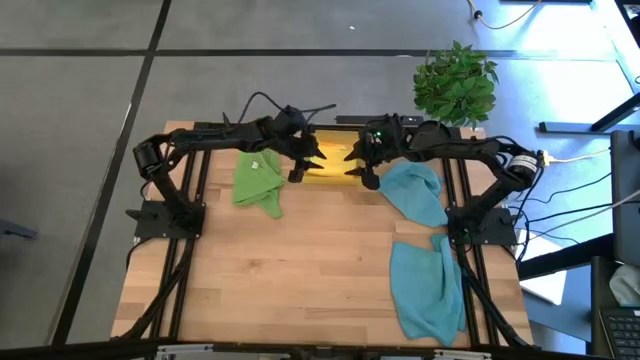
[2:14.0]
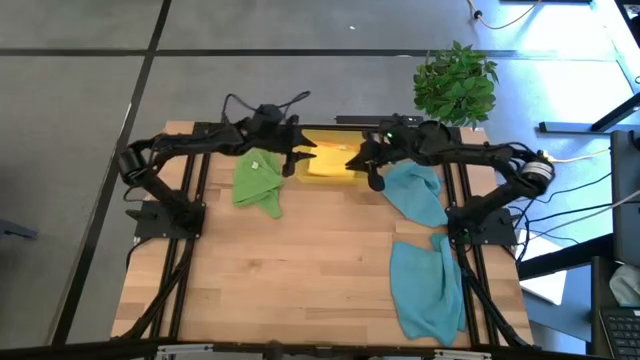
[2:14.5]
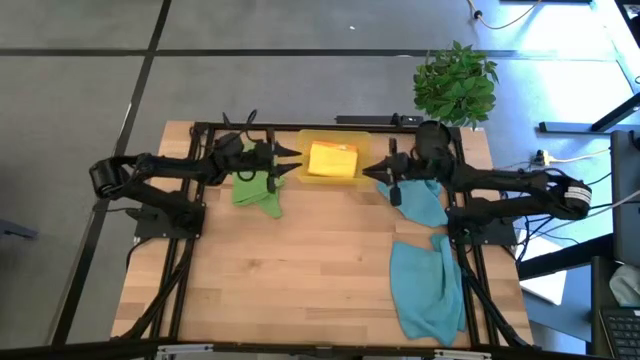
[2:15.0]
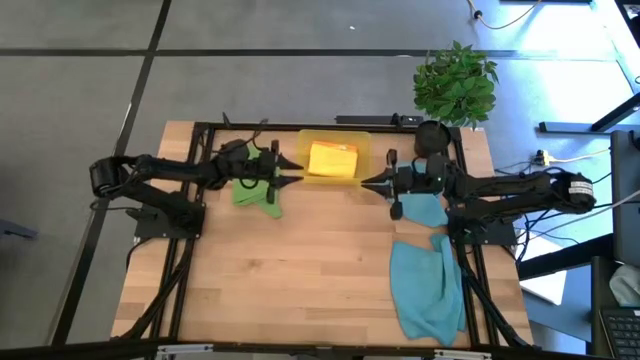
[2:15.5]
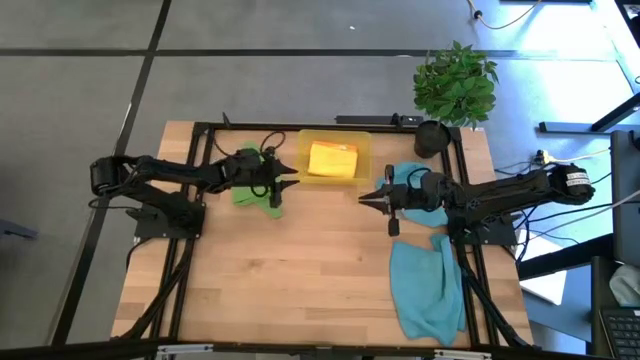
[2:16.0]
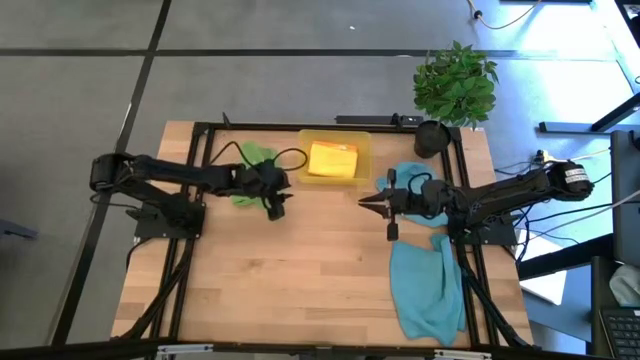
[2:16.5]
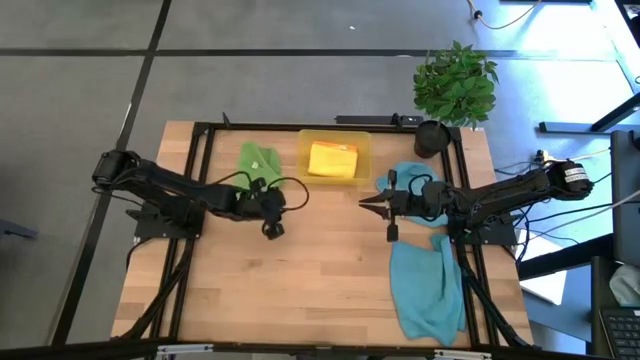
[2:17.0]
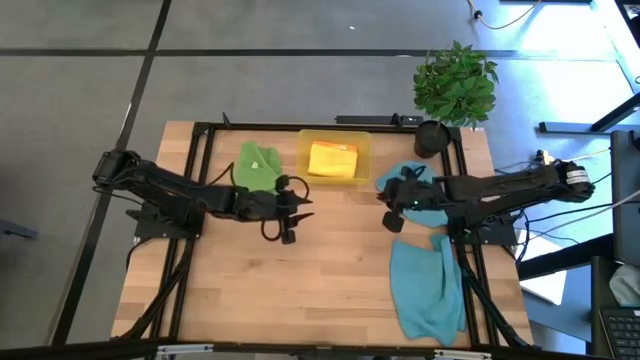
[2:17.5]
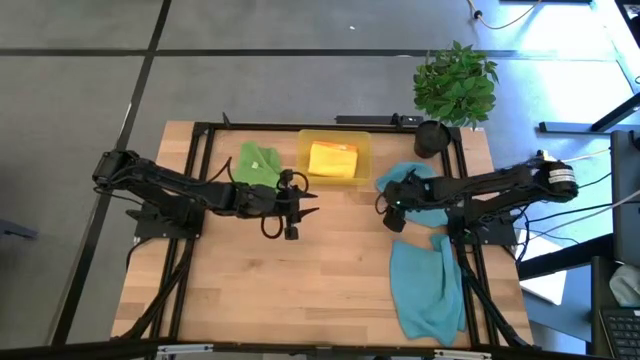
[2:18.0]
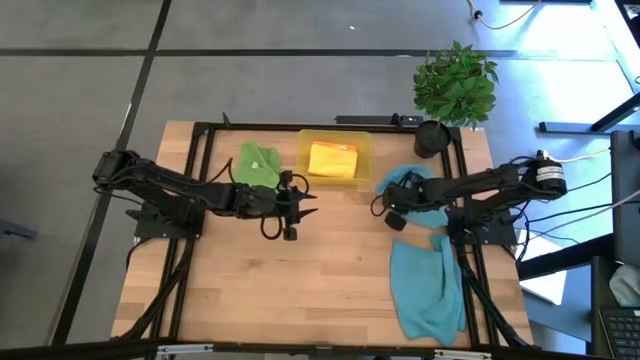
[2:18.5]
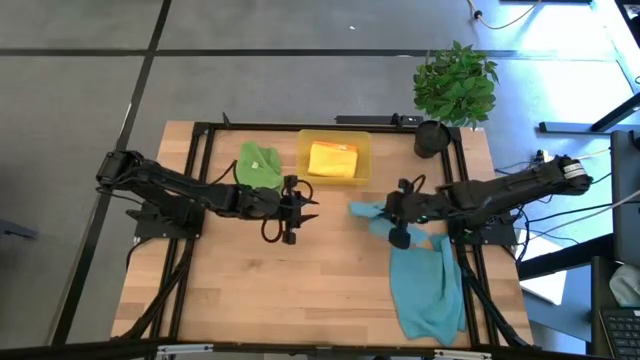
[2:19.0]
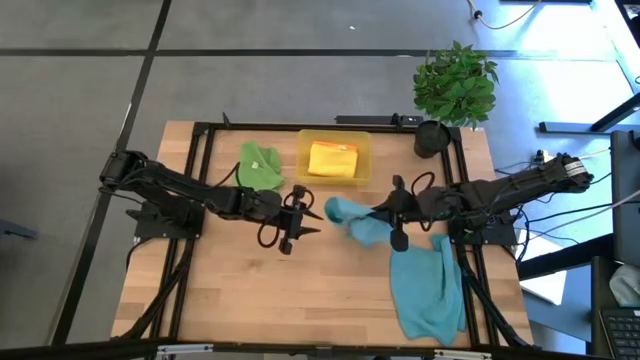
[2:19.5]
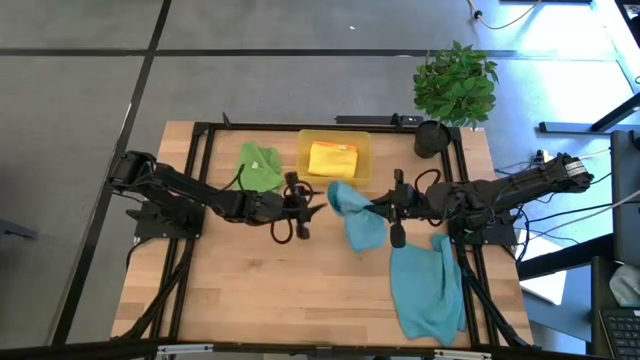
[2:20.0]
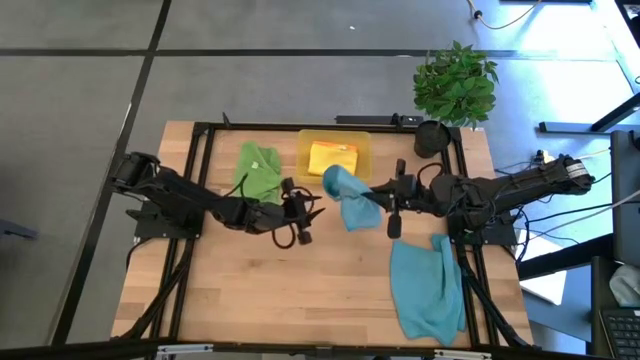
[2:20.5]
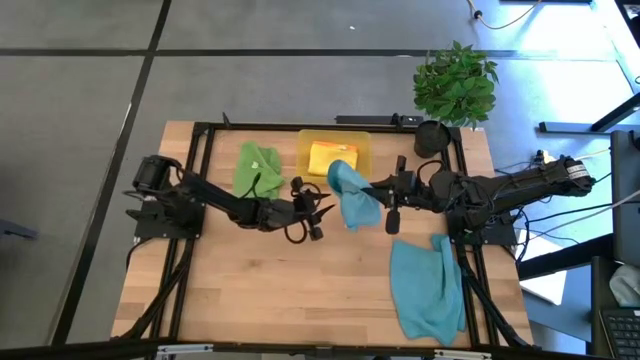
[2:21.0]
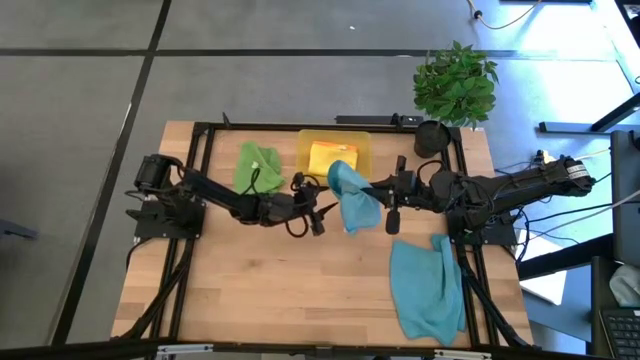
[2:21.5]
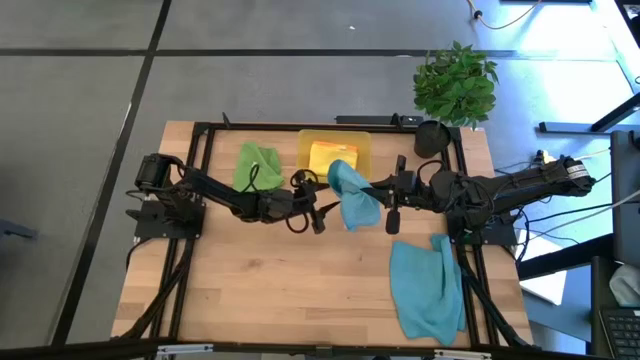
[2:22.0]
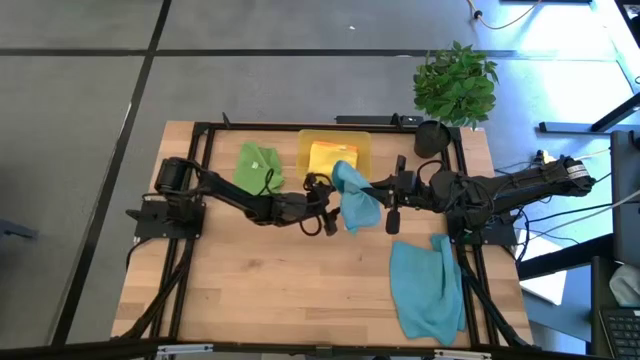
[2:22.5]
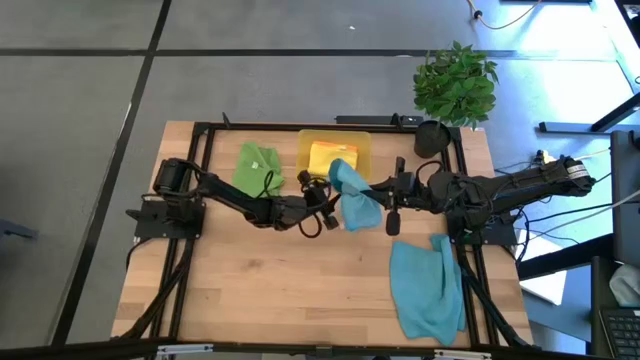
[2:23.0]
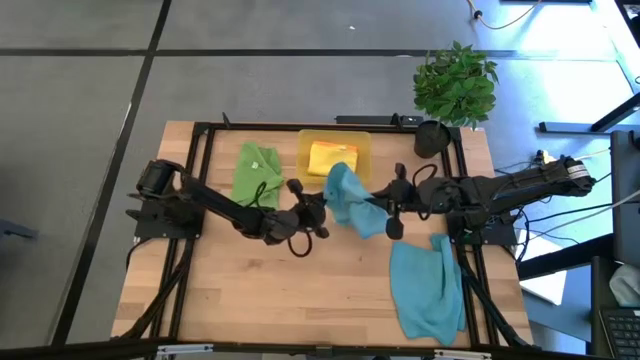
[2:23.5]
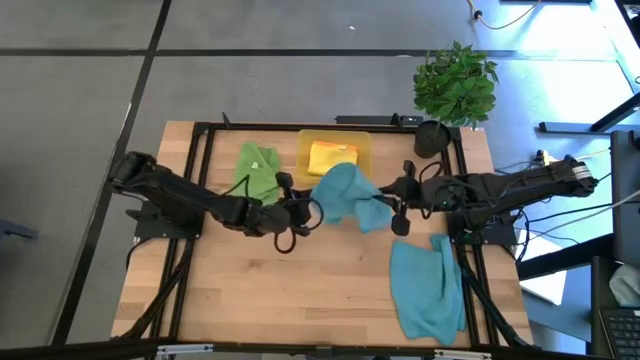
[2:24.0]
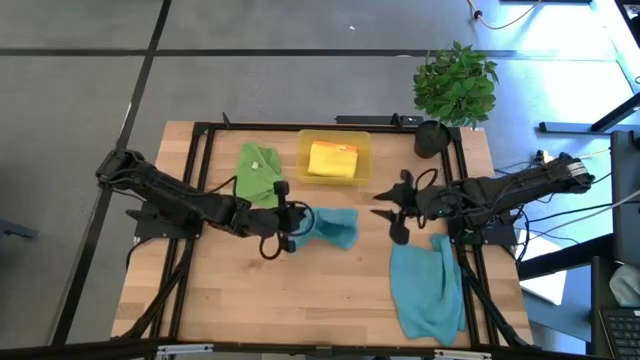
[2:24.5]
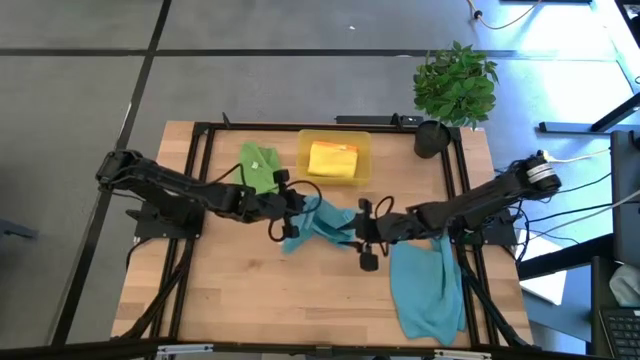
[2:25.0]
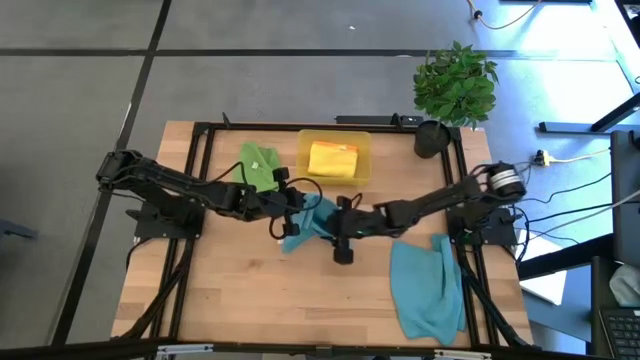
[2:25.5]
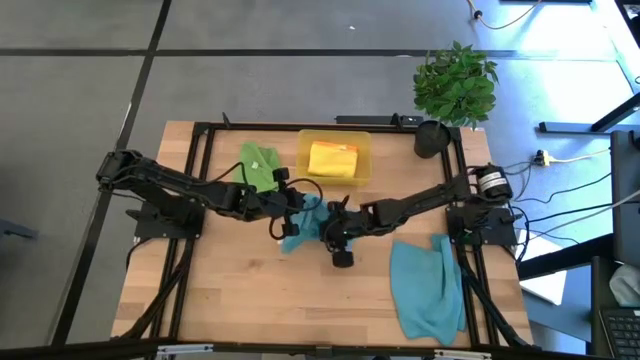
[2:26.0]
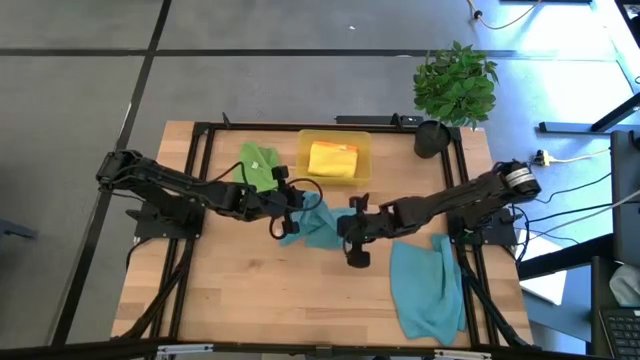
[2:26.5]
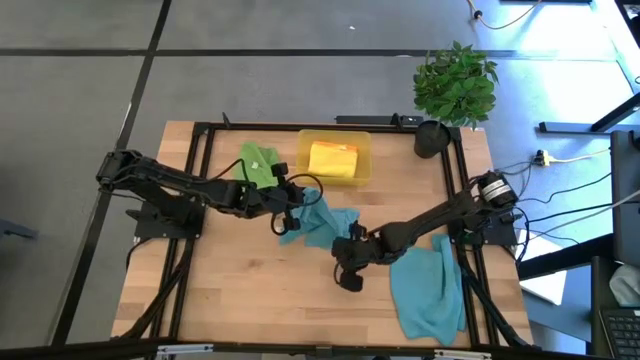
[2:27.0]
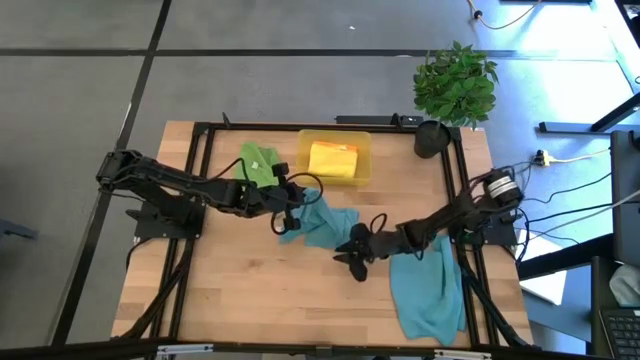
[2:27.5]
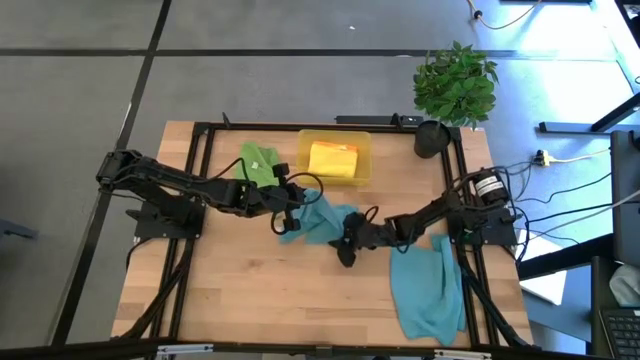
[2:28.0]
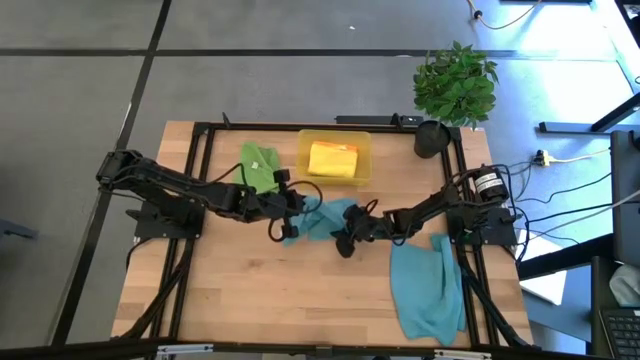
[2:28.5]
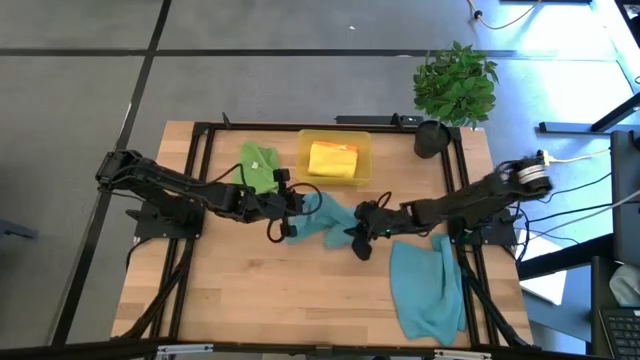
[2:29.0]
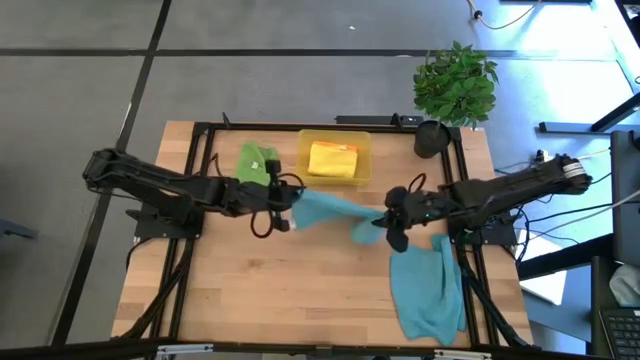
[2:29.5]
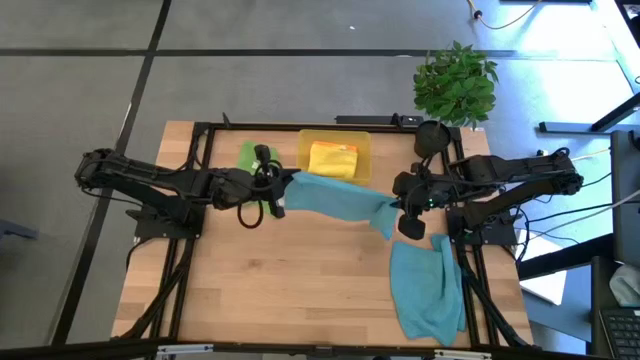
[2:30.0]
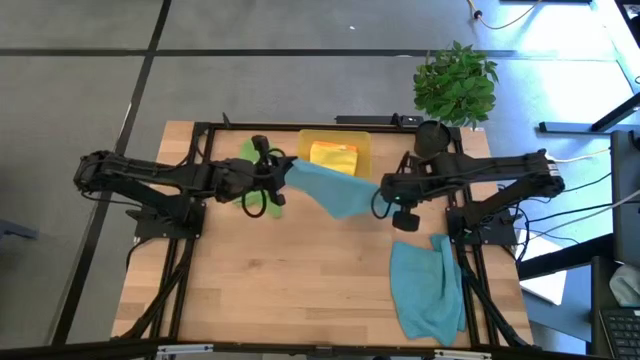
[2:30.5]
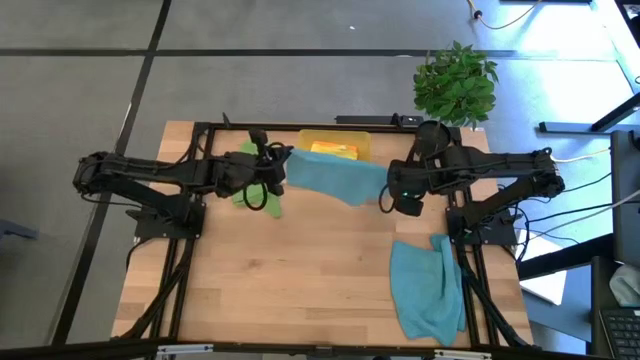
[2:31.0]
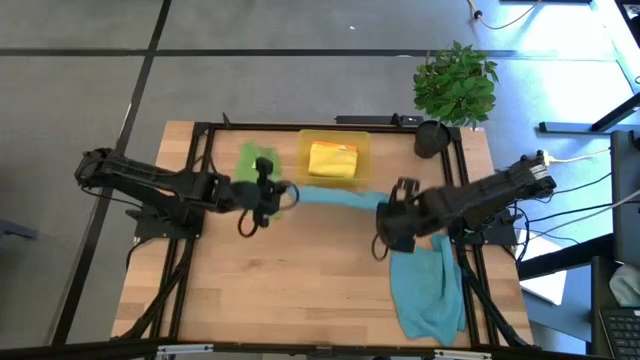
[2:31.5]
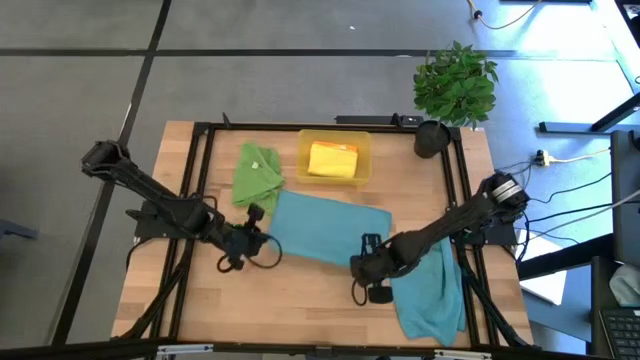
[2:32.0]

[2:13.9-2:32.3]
Task: Fold microfiber towels
Fold the top blue microfiber cloth

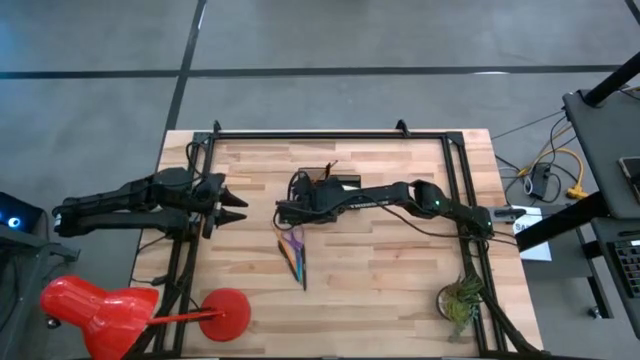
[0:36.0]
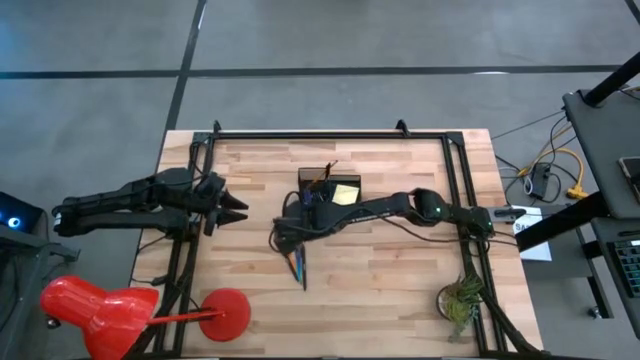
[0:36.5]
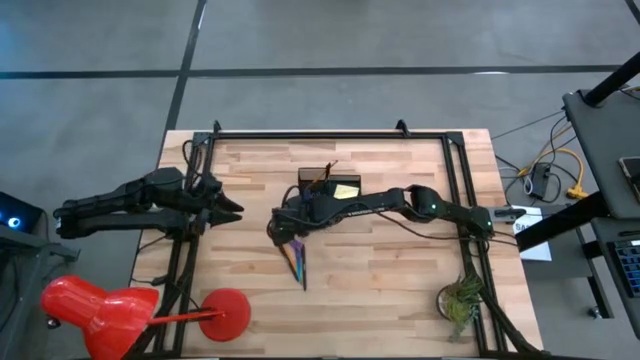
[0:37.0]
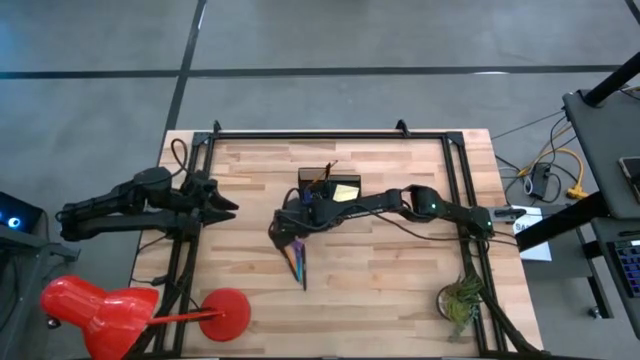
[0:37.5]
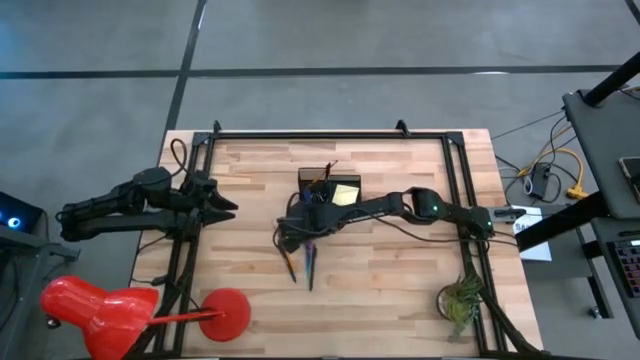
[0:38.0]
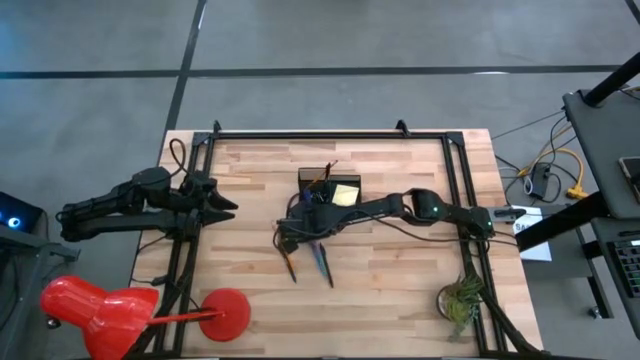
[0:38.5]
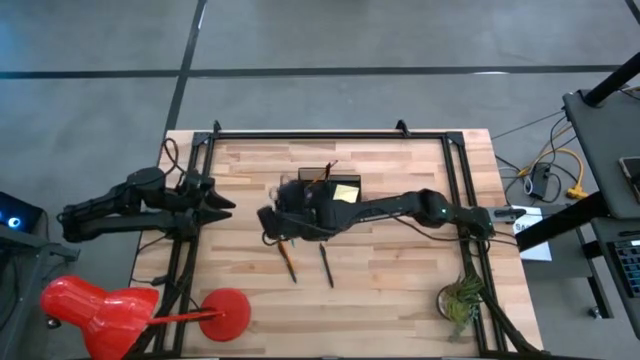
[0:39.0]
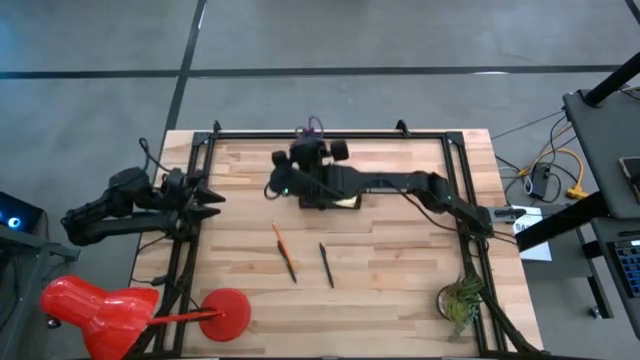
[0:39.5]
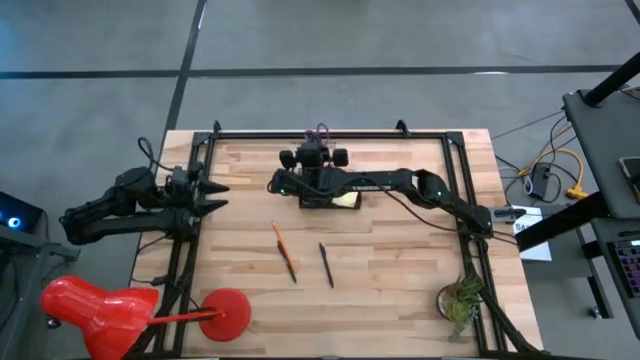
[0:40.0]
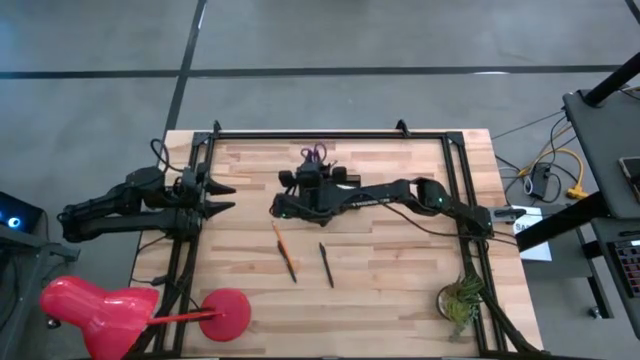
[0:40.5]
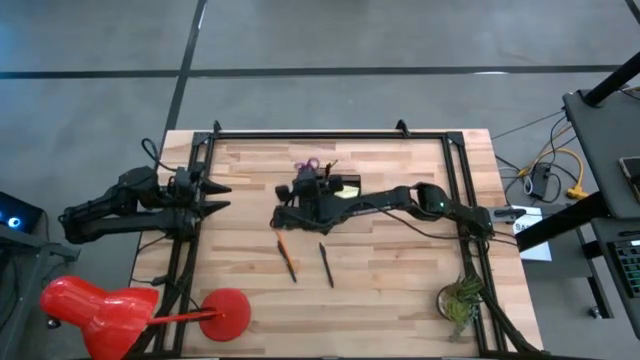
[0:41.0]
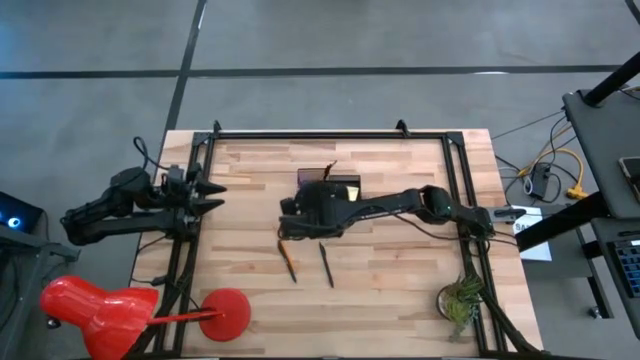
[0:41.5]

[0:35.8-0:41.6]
Task: Pick and place office supplies into organizer
Put the scissors into the black desk organizer
